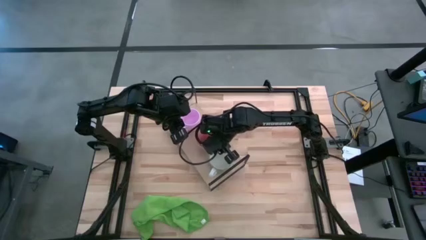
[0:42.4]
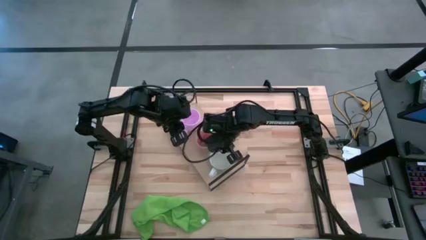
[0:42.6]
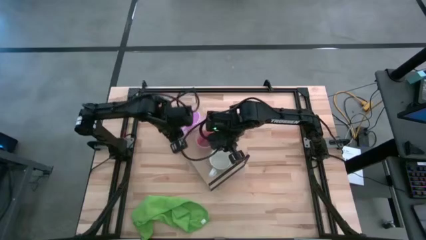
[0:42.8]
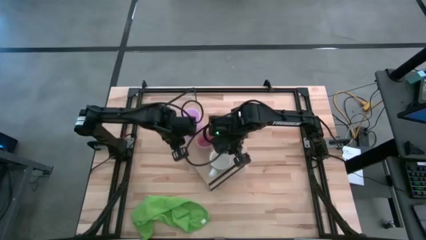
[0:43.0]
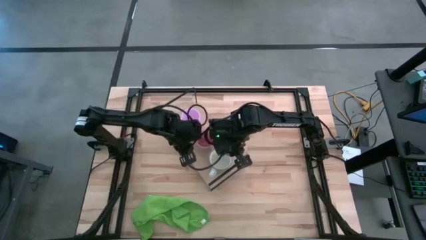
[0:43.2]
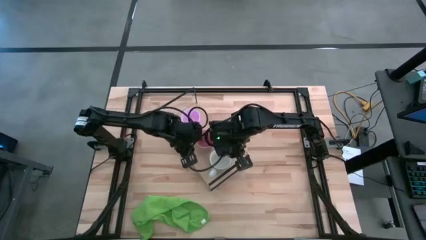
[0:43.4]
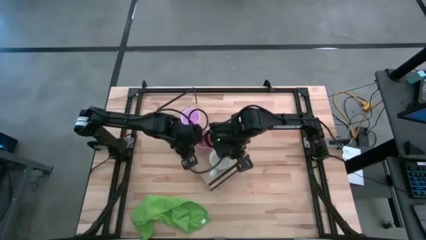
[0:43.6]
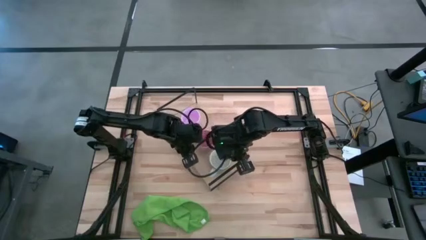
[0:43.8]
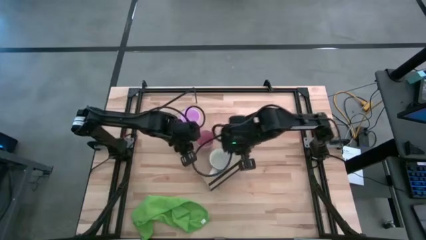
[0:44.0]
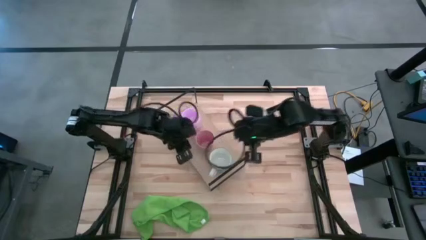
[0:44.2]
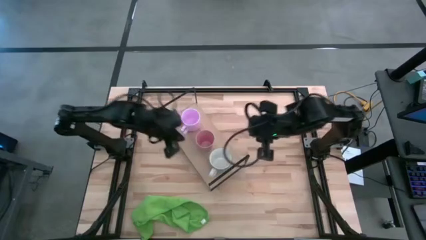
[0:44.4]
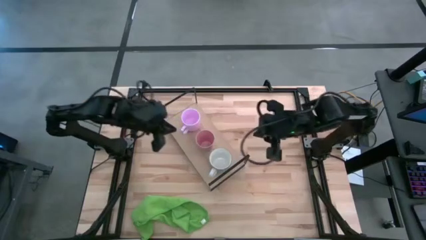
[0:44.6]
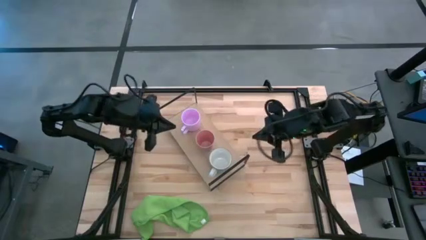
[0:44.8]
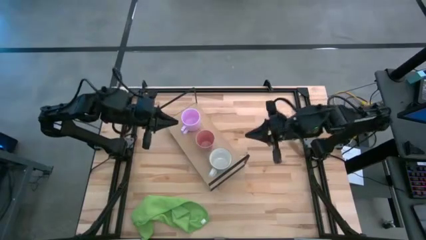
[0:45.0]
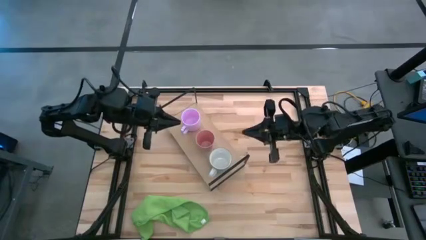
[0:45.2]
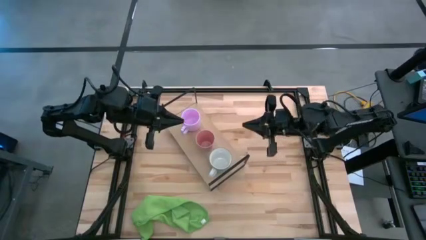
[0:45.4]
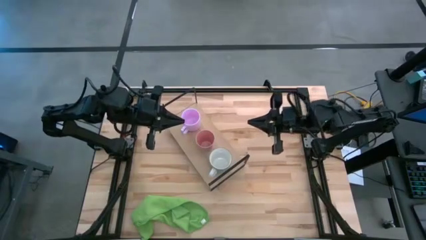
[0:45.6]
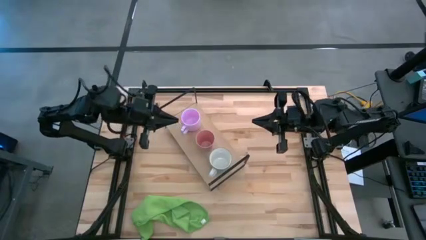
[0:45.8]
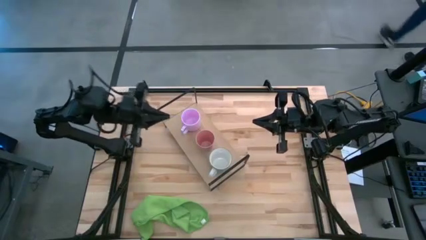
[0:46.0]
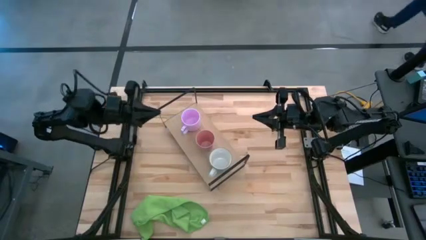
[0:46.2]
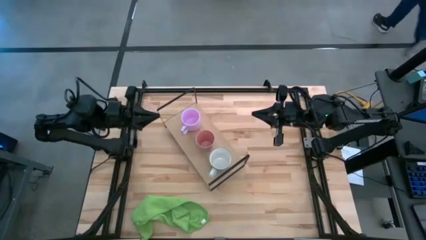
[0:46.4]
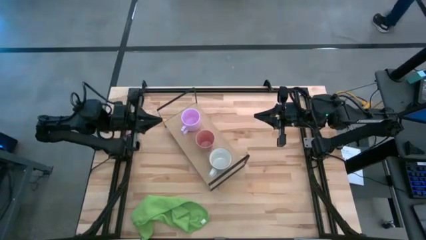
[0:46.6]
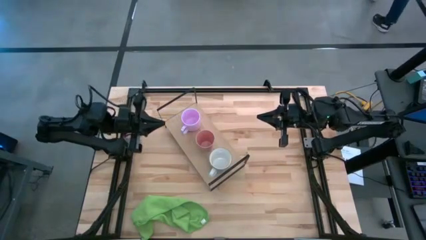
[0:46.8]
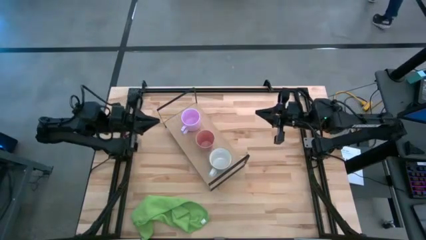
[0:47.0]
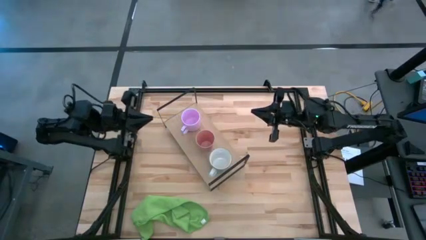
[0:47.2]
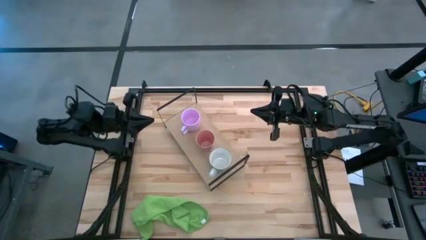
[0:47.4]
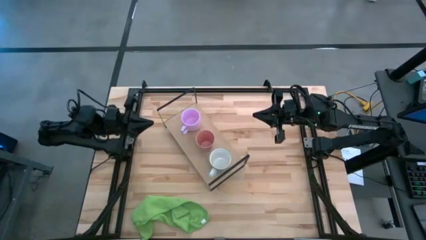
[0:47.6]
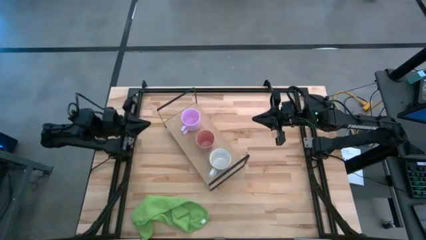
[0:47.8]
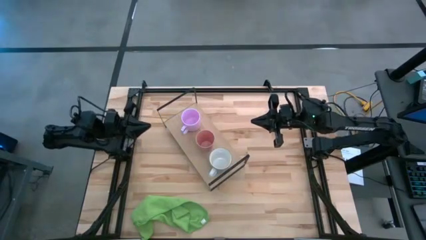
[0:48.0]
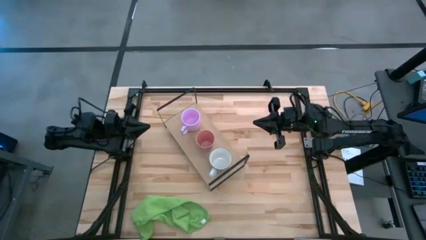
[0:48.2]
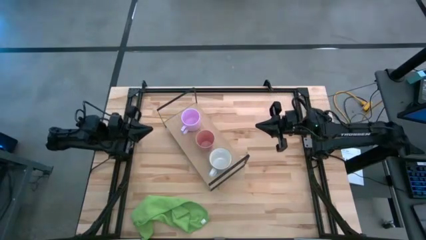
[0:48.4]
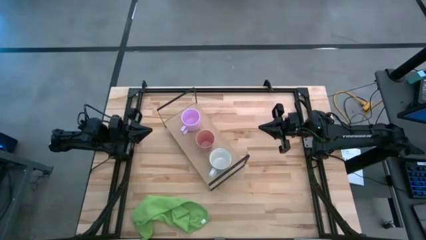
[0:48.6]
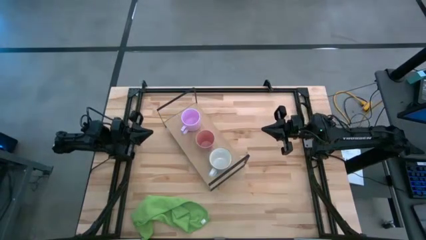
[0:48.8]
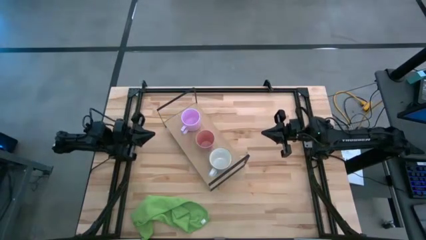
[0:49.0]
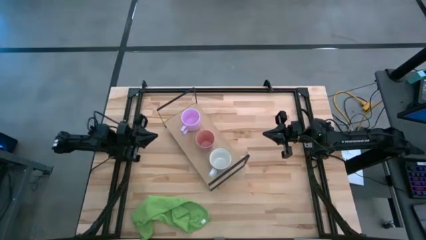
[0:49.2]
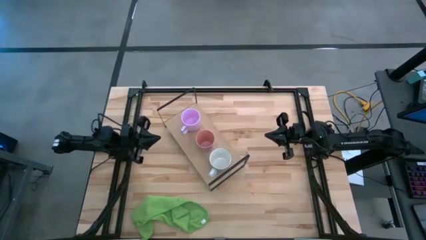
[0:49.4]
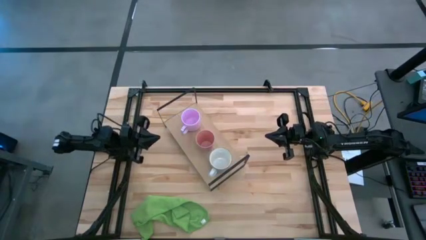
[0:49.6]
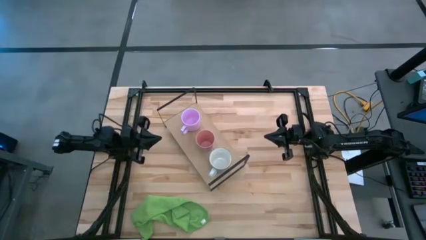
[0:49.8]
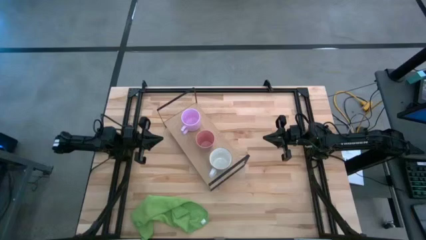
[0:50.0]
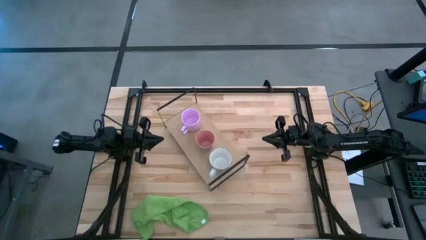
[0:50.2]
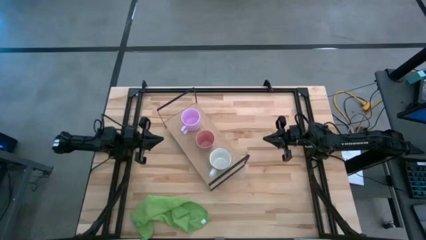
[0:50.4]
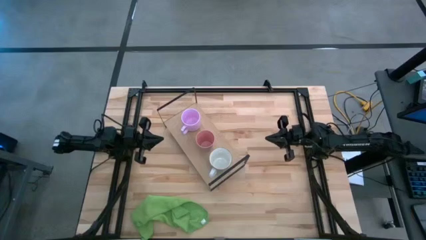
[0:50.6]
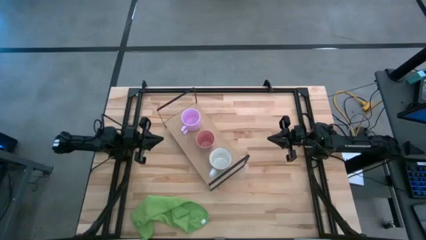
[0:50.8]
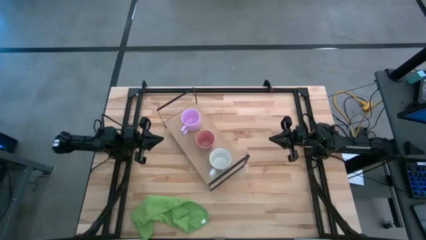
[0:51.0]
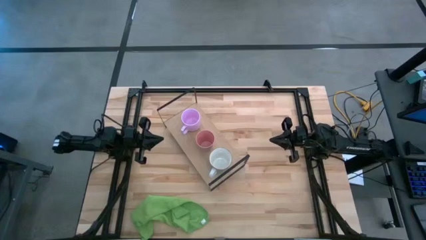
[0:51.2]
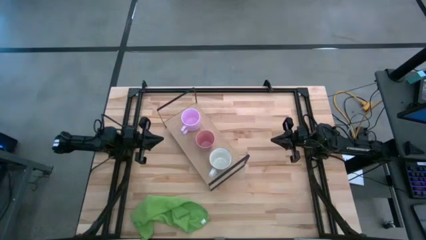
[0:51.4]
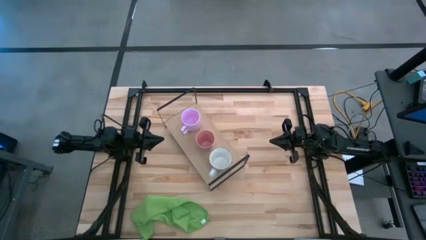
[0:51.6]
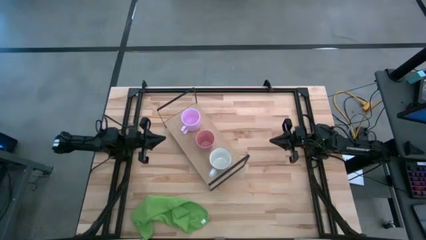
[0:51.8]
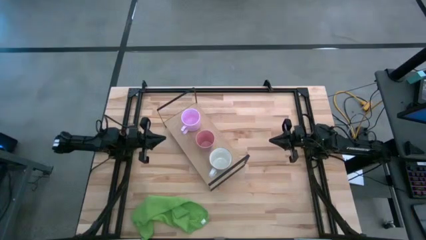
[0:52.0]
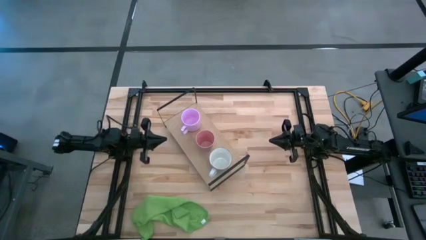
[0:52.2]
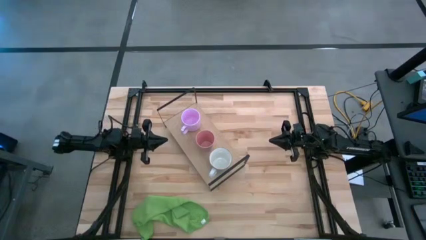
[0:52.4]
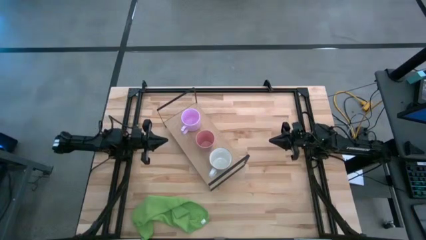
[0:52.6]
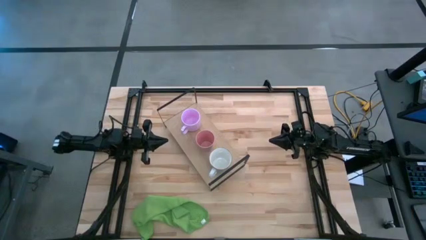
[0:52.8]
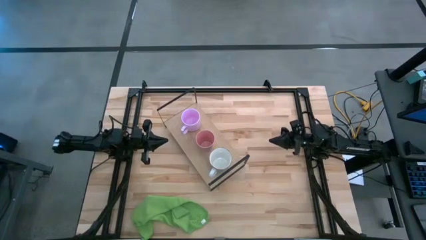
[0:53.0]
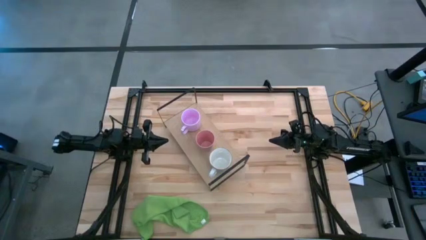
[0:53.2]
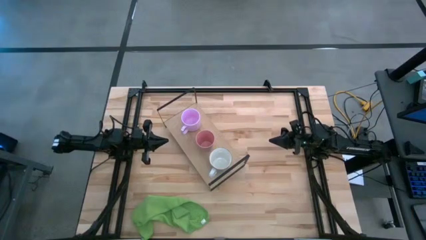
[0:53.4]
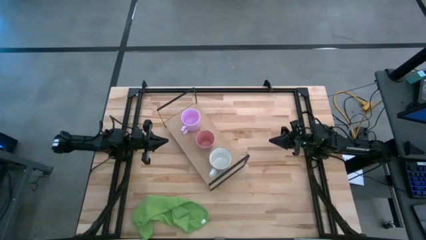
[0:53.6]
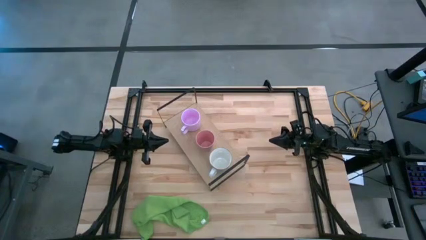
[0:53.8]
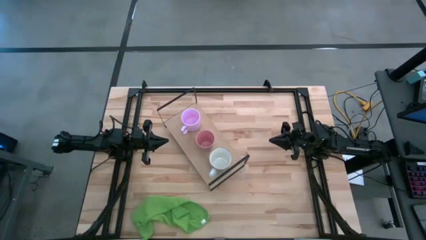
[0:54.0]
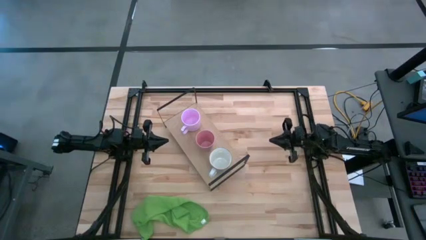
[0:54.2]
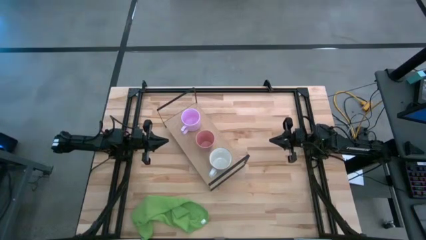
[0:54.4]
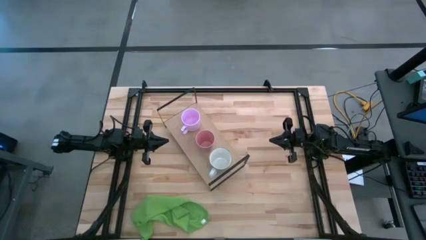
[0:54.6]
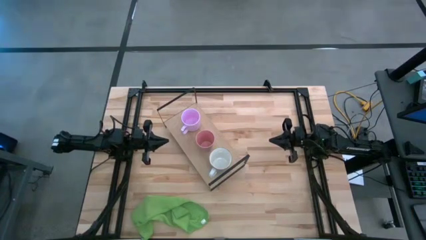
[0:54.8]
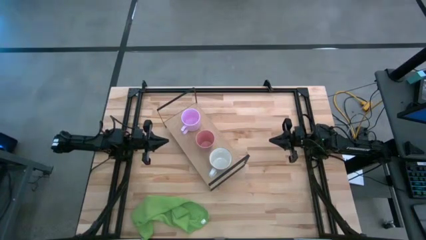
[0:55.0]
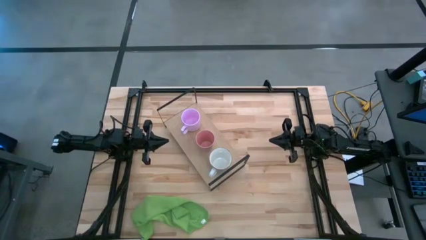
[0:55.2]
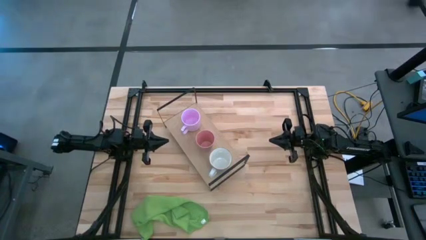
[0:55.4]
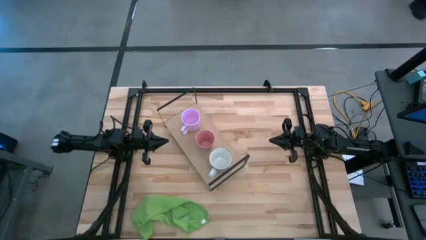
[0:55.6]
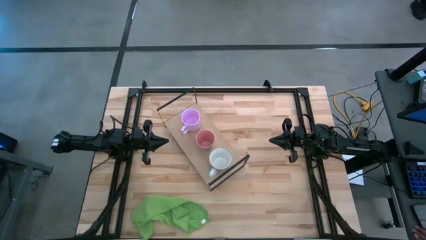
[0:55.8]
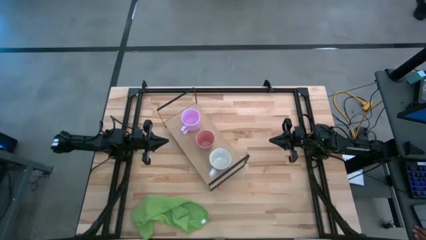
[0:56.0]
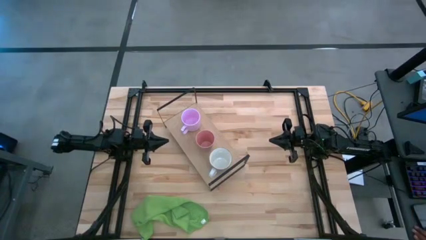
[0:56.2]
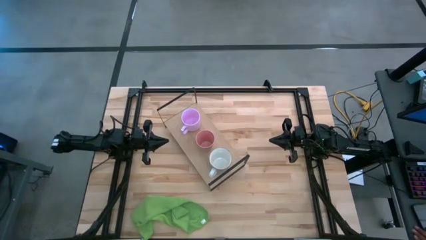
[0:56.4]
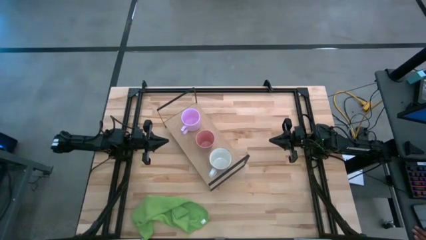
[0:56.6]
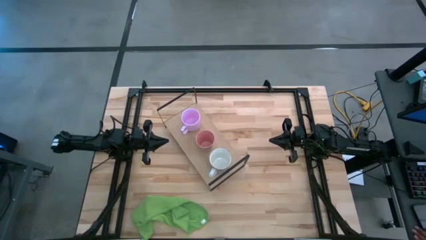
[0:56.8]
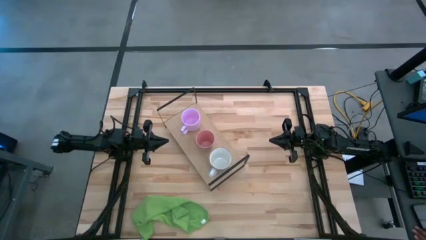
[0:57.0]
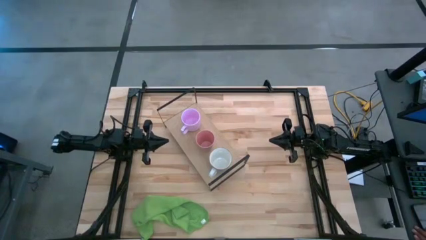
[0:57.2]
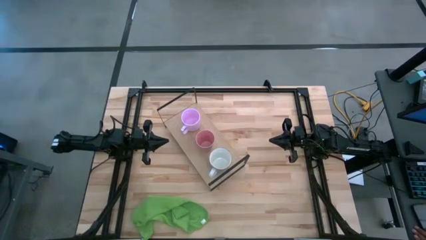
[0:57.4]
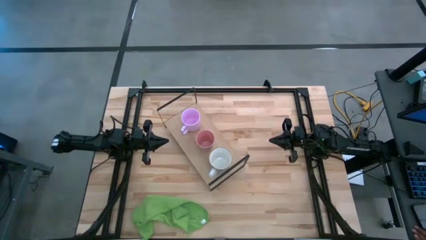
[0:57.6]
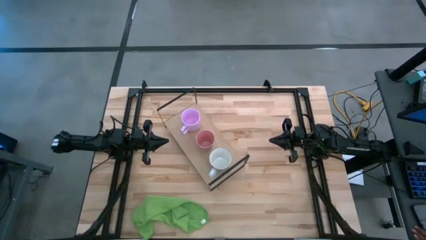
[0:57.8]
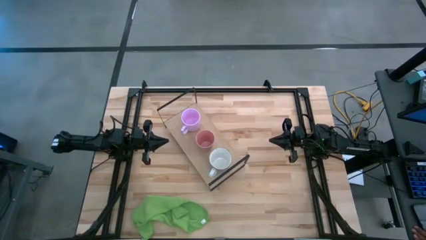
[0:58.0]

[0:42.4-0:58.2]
Task: Stack small to large cups/mugs on shelf
Return to Home Position
